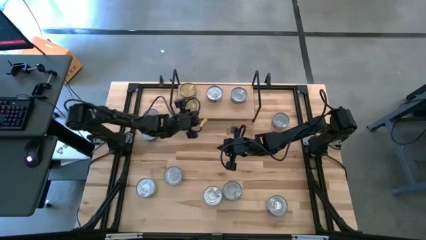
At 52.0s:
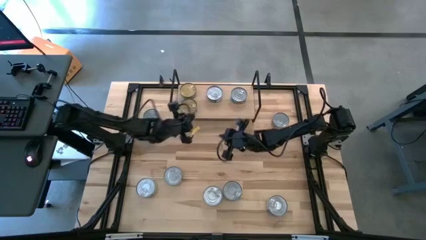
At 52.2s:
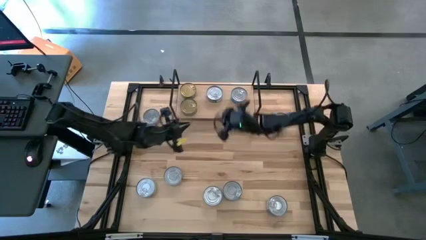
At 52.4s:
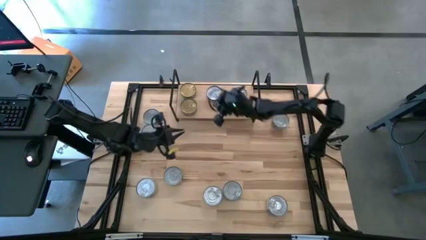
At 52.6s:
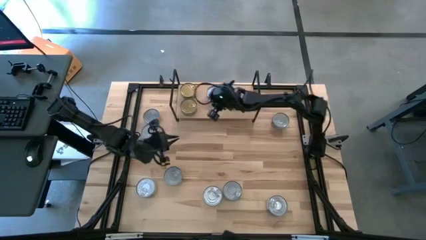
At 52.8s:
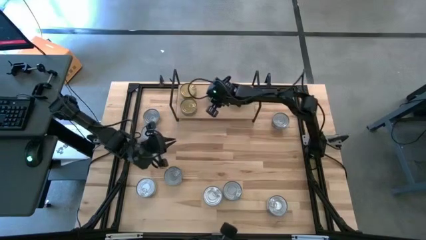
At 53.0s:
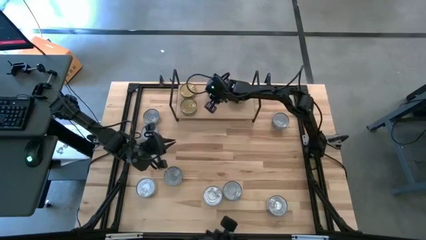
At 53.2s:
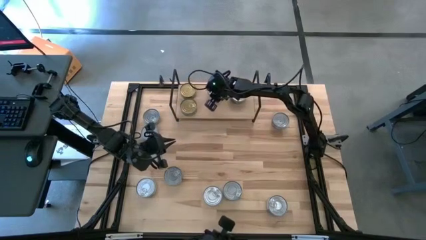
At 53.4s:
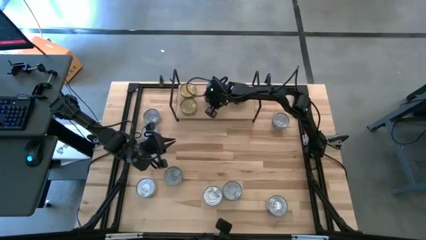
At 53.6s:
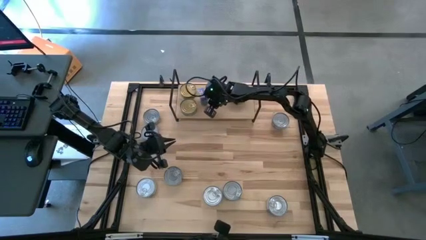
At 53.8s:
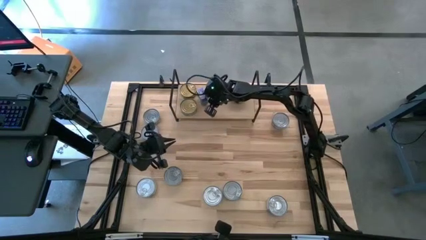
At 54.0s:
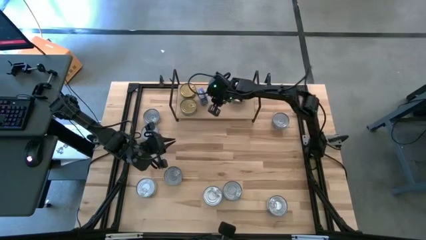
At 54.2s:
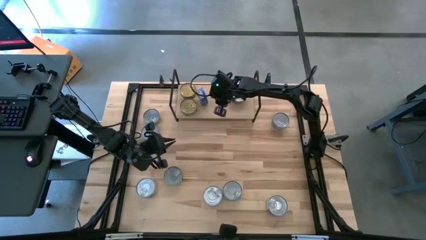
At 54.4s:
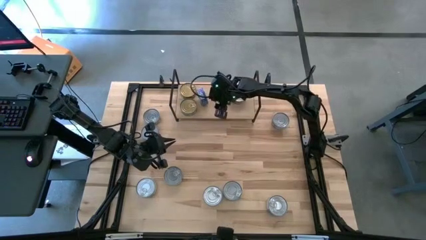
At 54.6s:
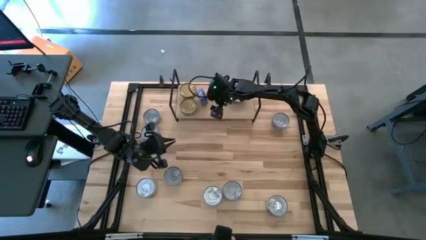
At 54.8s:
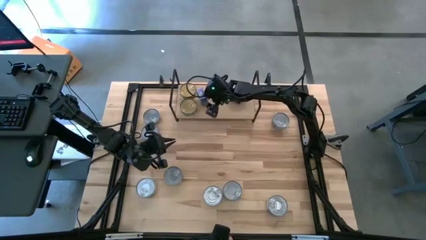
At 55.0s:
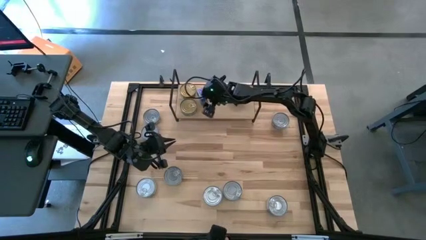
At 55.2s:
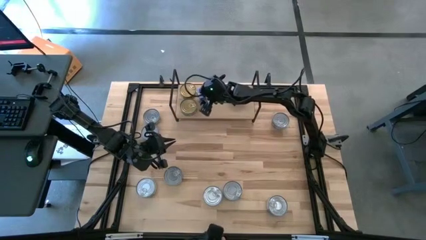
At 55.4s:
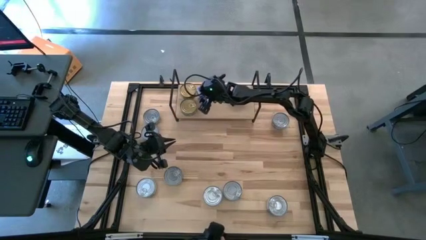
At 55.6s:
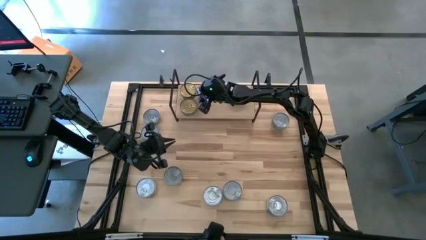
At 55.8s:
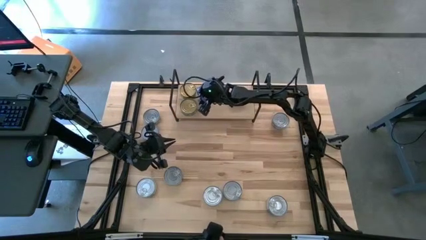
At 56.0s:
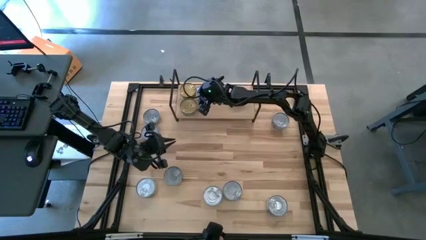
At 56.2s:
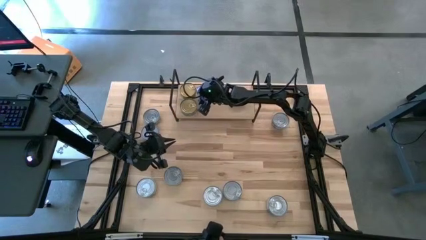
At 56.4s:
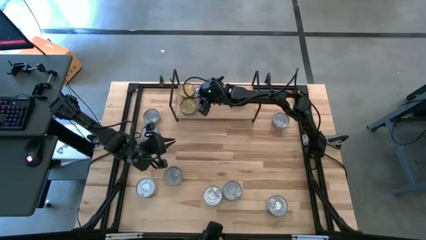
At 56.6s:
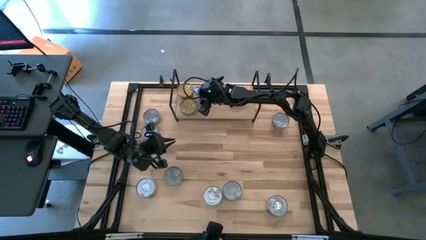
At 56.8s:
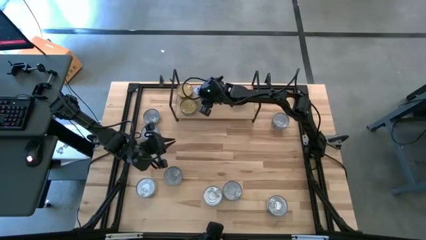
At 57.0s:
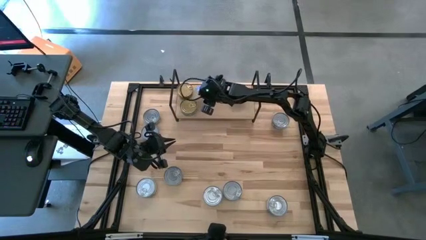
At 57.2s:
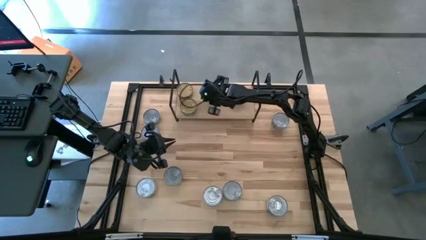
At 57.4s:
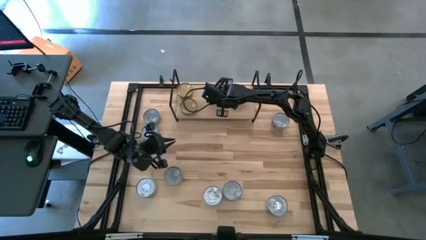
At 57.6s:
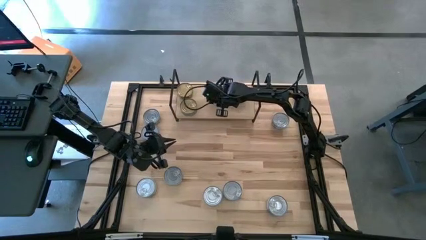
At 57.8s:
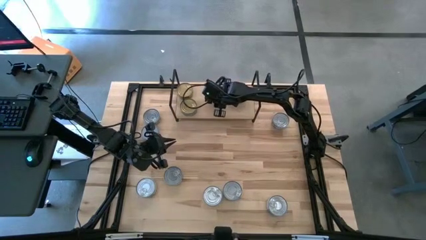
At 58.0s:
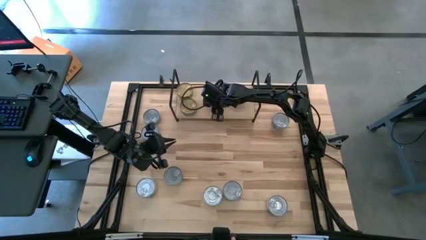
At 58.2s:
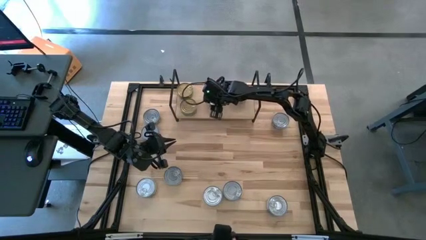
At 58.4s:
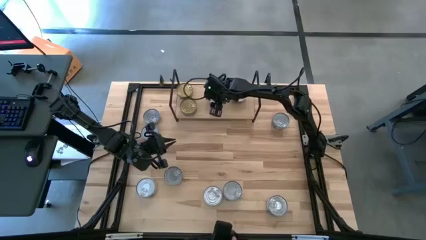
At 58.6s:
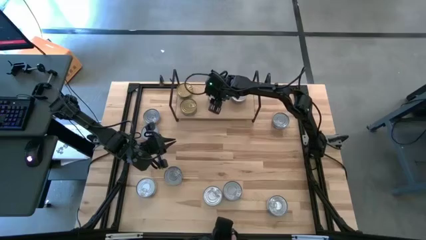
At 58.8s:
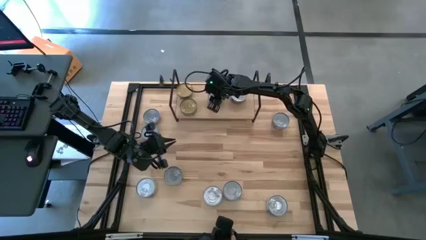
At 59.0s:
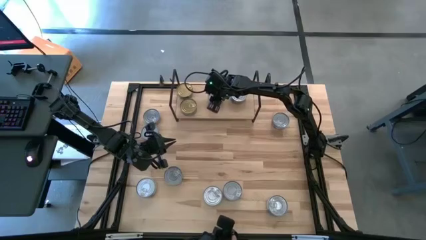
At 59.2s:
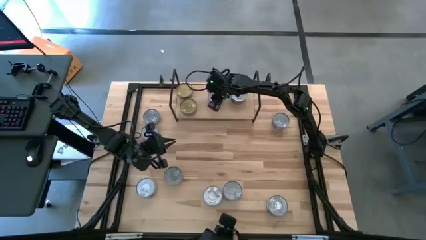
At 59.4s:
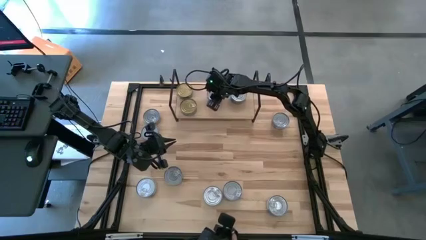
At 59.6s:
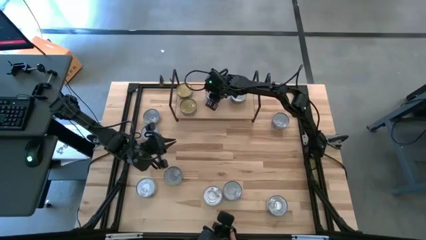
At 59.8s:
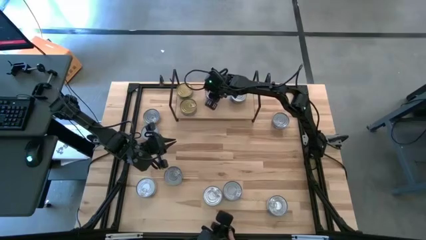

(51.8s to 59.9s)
Task: Stack canned seafood by type on shelf
Adjust the blue tuna can on the shelf

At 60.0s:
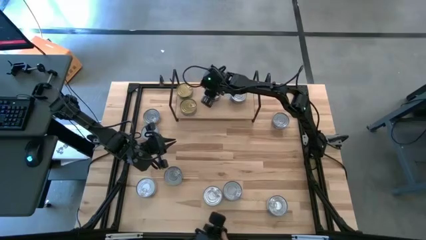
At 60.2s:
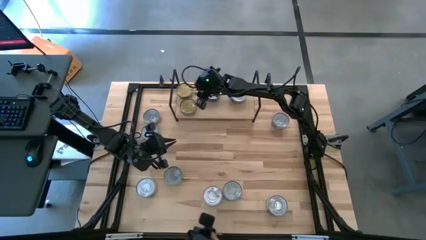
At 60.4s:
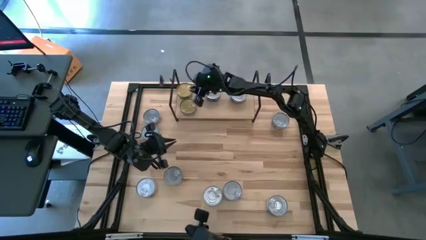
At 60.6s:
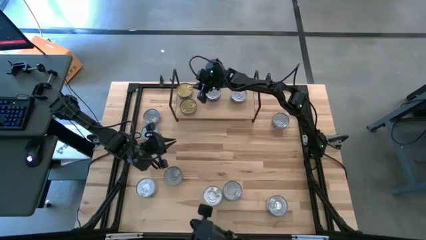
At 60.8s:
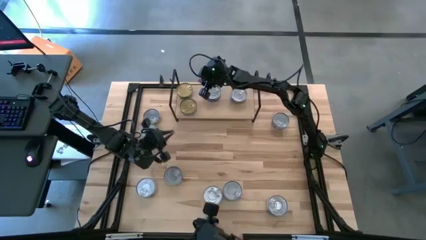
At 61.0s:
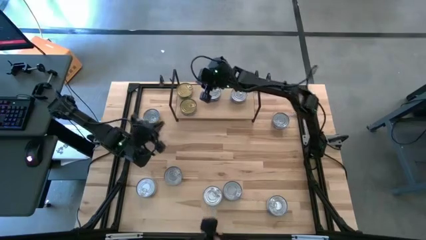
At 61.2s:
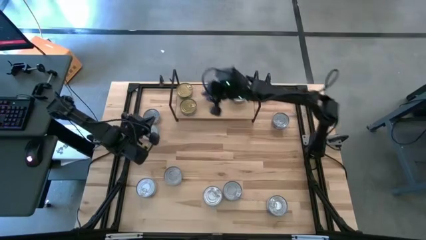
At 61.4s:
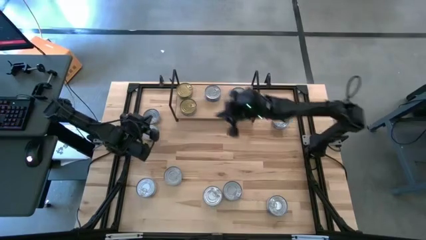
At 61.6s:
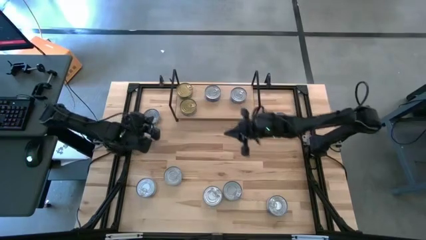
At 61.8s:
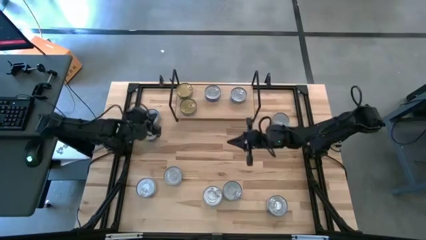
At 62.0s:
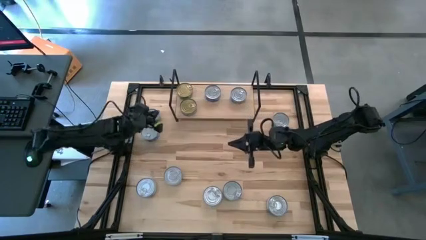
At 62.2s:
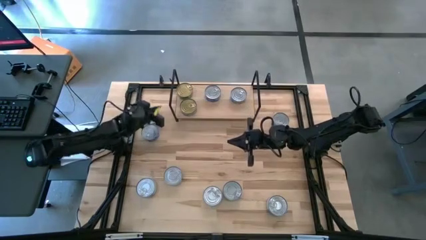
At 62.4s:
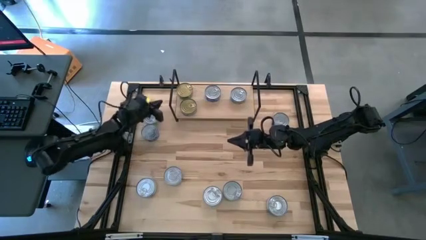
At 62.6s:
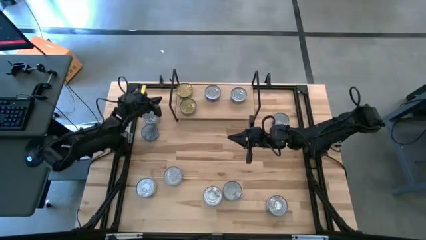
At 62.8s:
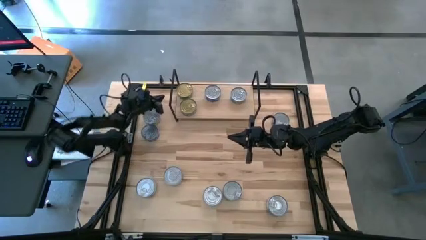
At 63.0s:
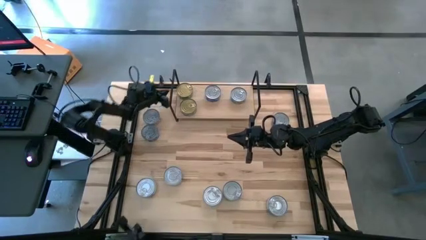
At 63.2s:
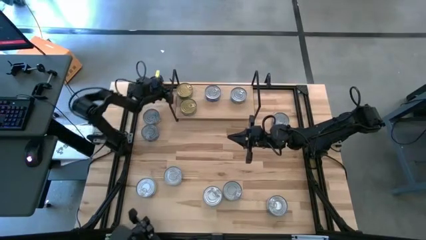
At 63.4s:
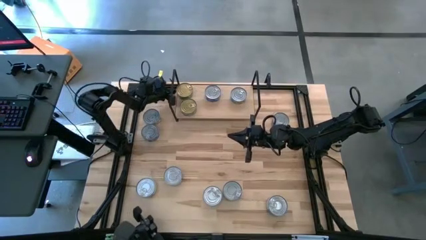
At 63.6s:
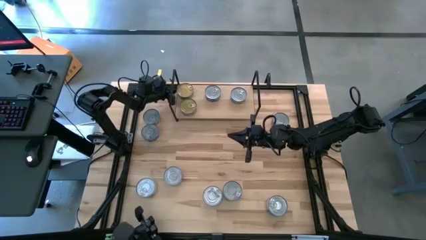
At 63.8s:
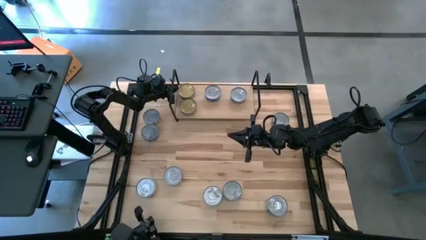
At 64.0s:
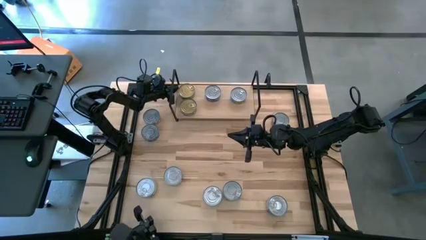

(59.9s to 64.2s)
Adjust the green tuna can on the shelf

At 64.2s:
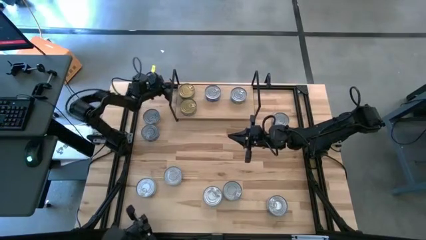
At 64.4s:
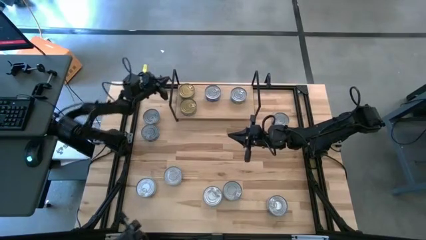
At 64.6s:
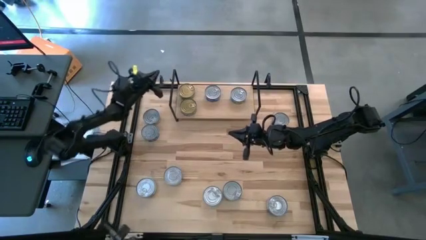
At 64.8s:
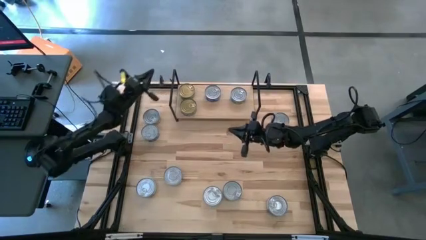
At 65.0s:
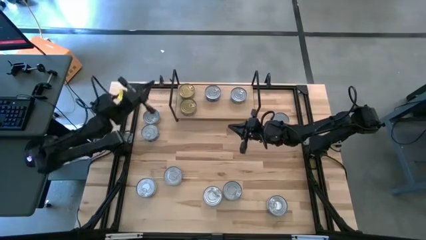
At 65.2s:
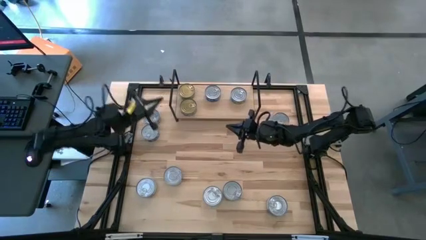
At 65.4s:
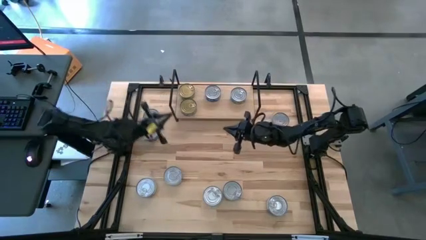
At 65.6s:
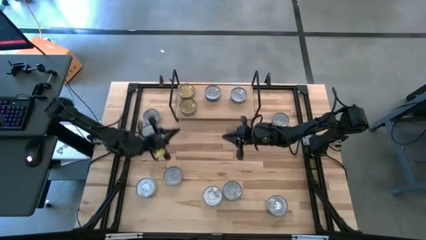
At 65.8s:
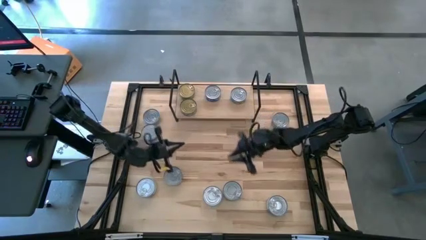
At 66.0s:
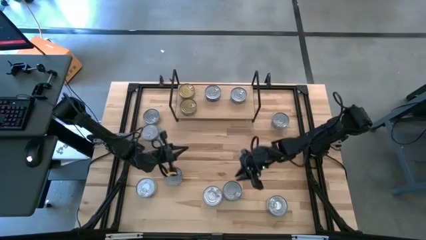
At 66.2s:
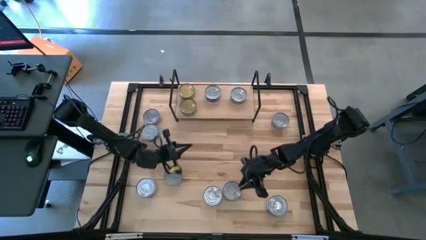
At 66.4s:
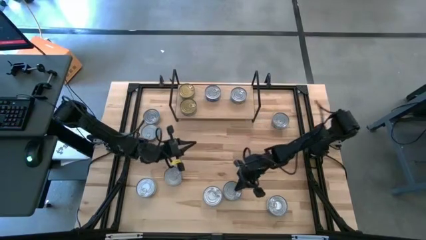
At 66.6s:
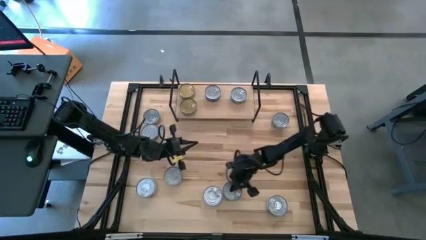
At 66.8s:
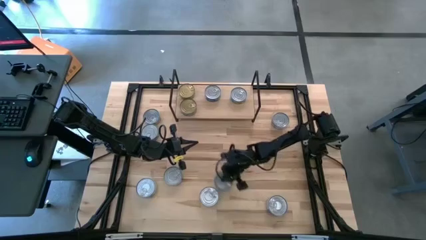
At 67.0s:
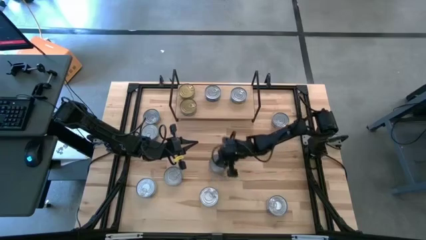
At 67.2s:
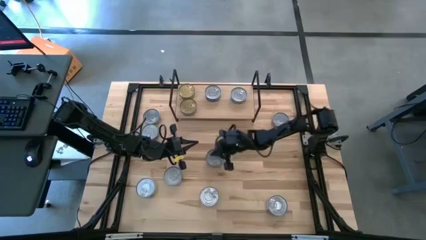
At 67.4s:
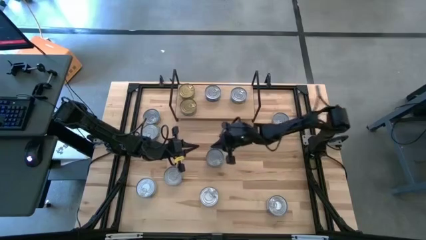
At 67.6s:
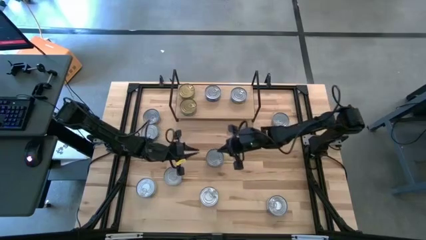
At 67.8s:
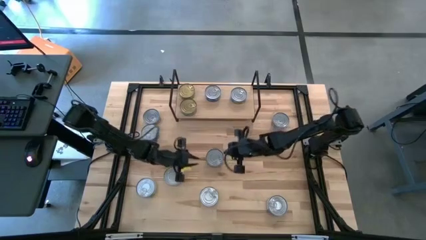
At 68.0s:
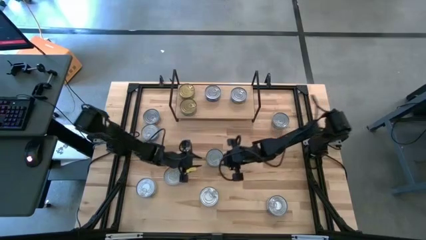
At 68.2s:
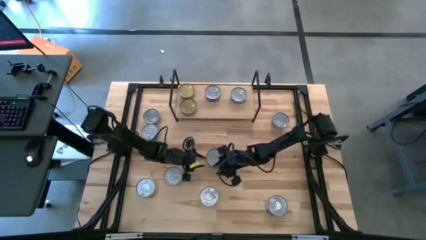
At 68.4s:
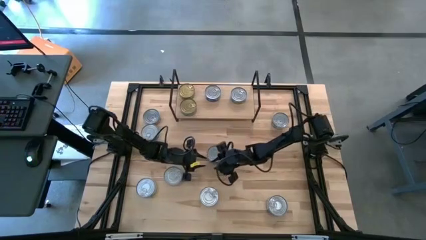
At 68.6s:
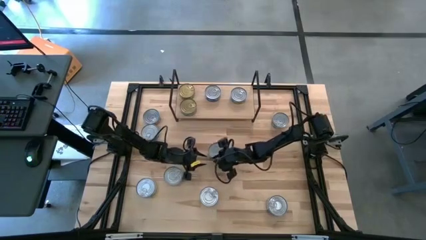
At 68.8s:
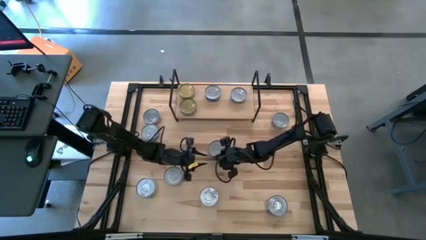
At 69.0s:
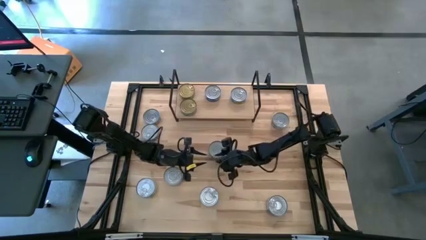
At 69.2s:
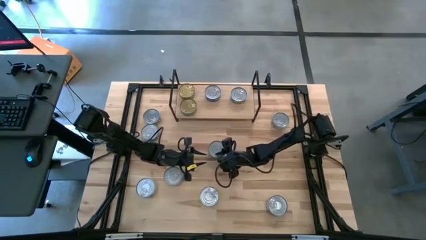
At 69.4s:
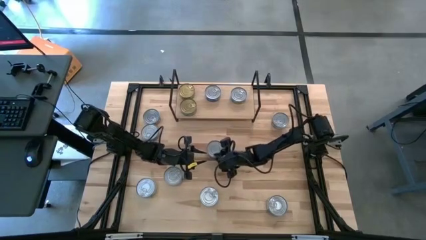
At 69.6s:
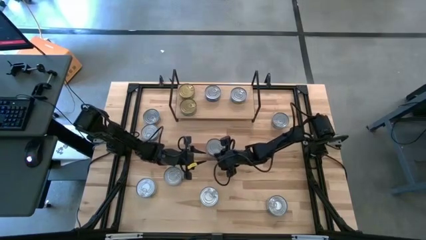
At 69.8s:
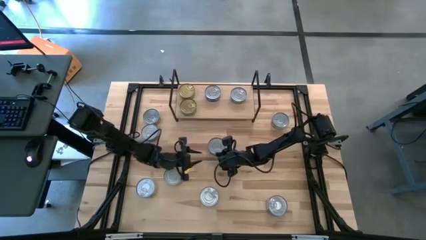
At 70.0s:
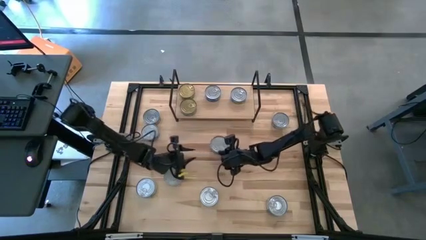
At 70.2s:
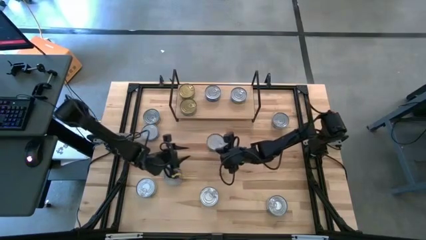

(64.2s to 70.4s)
Put the blue tuna can on the shelf
